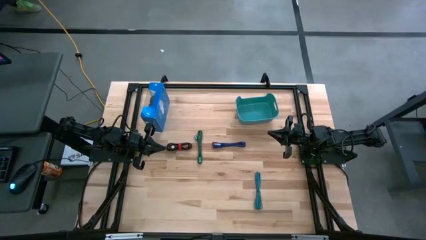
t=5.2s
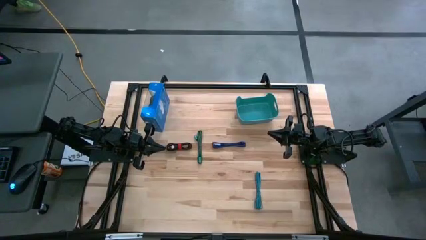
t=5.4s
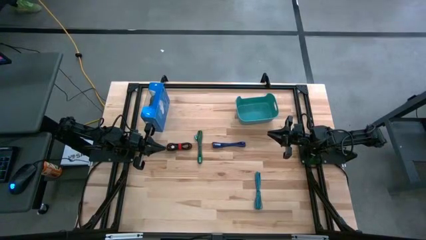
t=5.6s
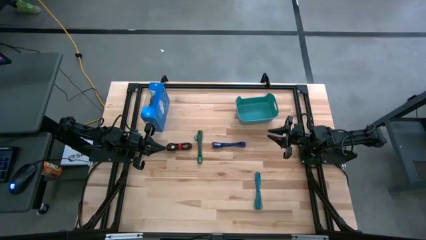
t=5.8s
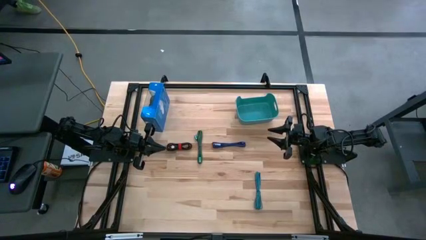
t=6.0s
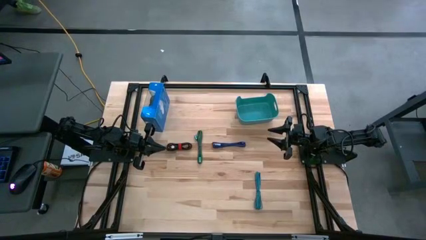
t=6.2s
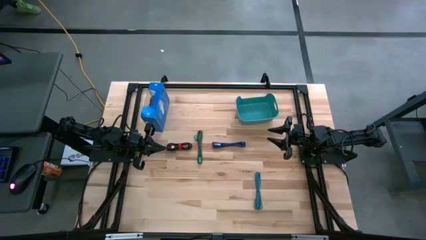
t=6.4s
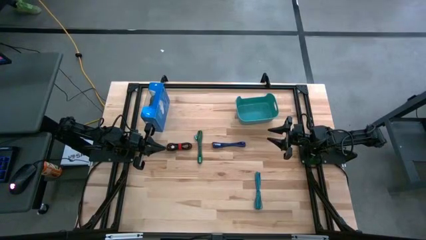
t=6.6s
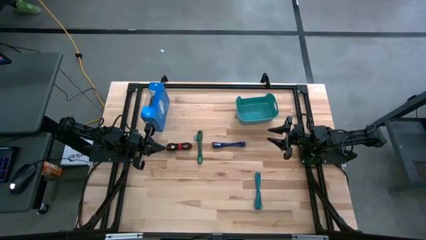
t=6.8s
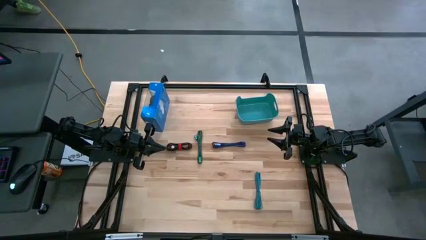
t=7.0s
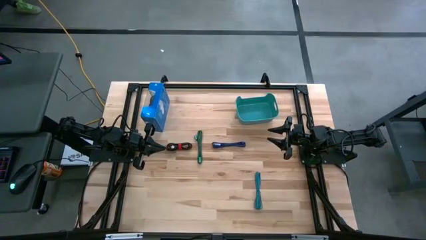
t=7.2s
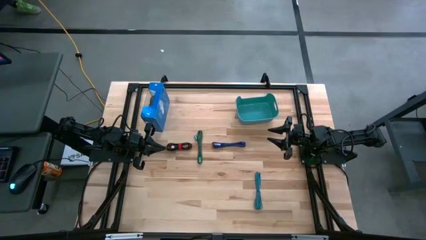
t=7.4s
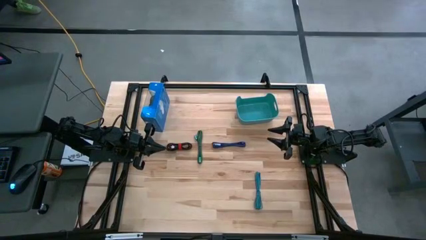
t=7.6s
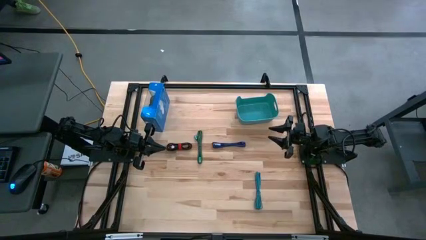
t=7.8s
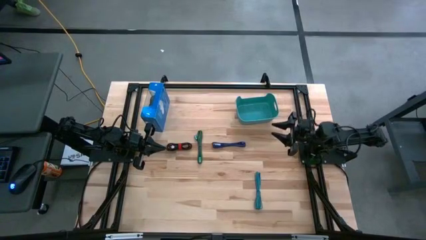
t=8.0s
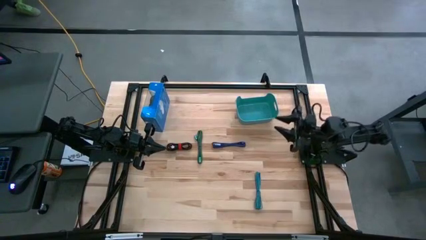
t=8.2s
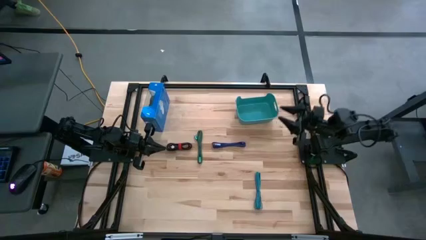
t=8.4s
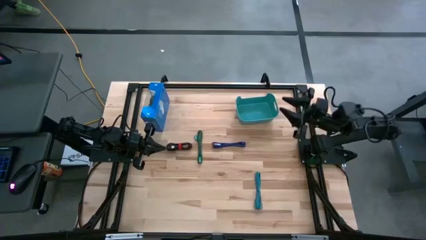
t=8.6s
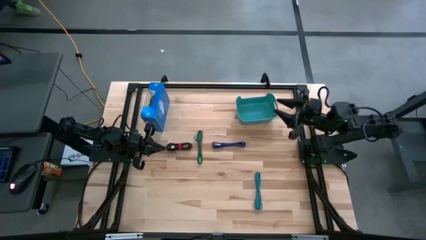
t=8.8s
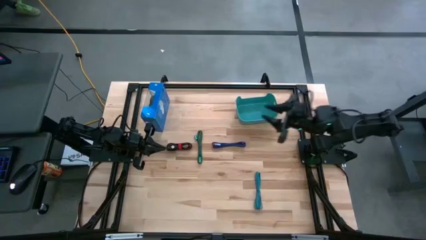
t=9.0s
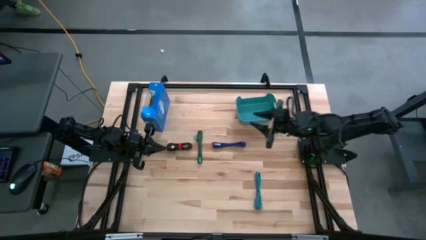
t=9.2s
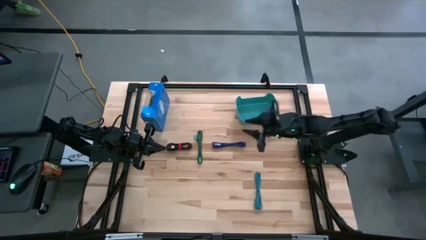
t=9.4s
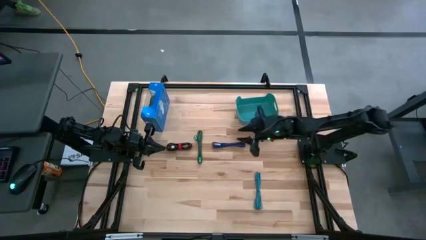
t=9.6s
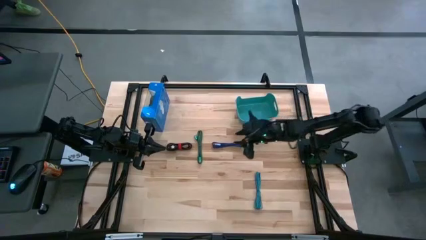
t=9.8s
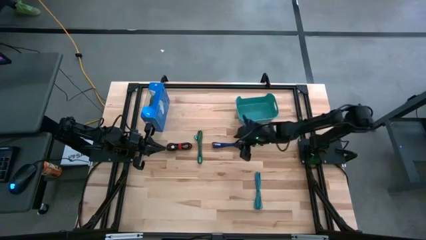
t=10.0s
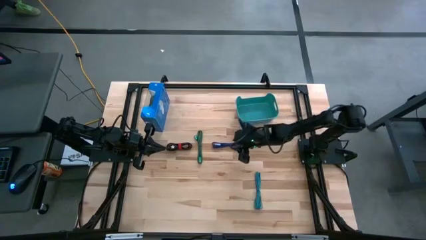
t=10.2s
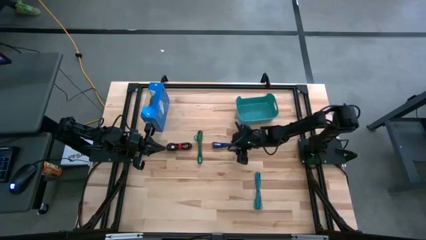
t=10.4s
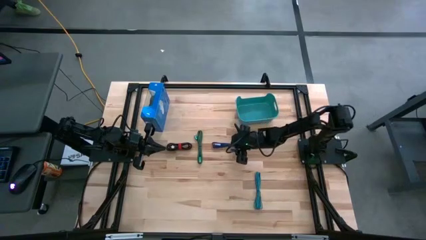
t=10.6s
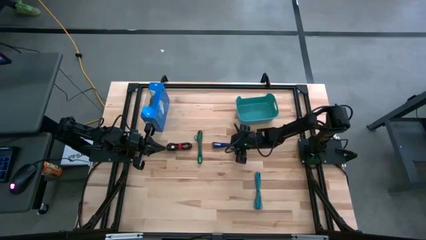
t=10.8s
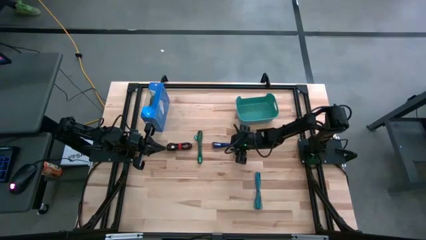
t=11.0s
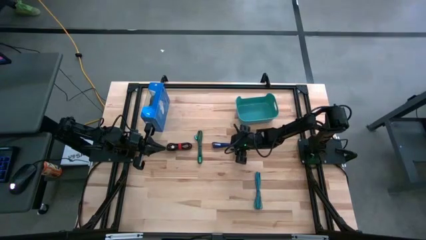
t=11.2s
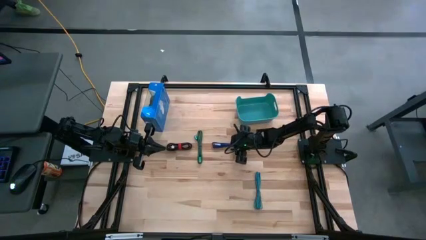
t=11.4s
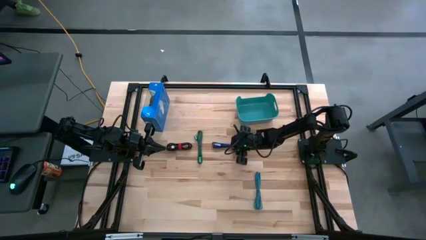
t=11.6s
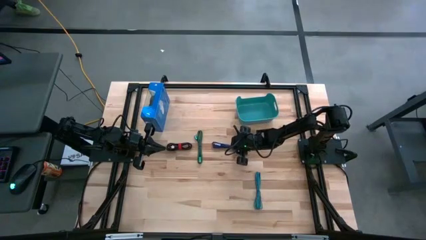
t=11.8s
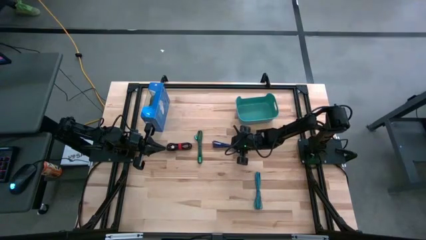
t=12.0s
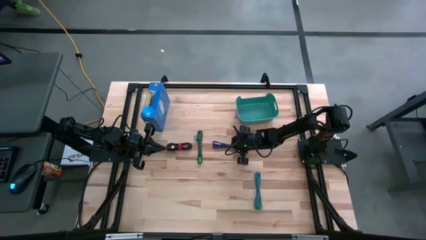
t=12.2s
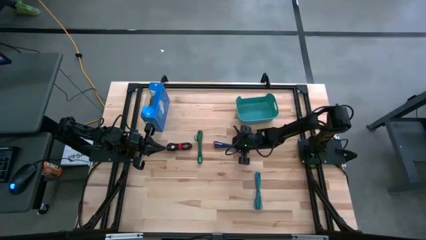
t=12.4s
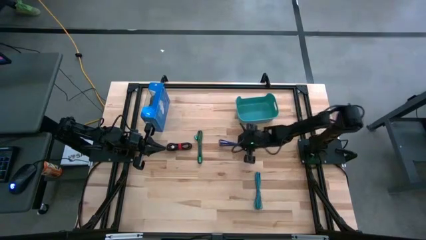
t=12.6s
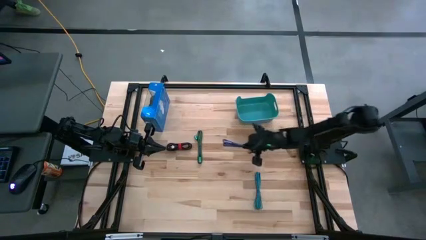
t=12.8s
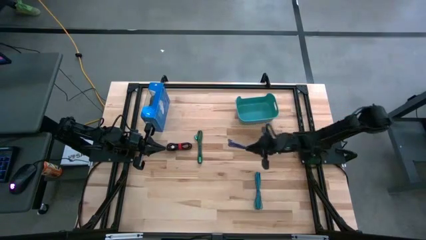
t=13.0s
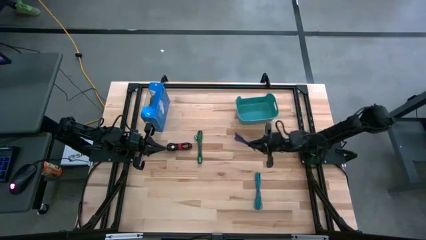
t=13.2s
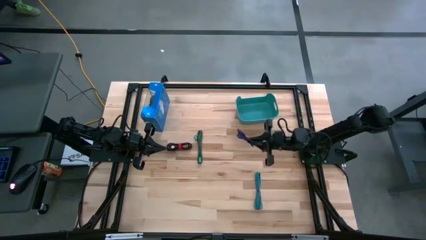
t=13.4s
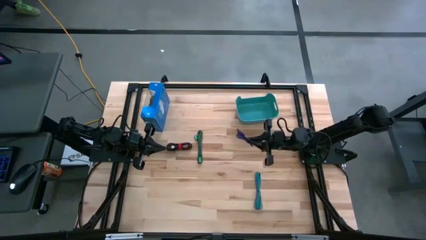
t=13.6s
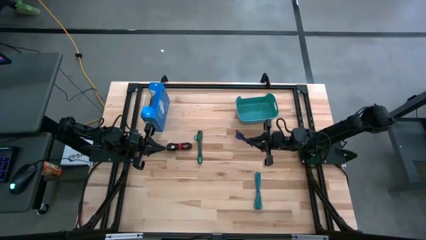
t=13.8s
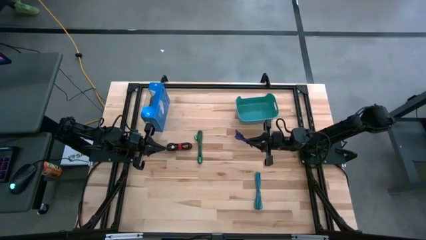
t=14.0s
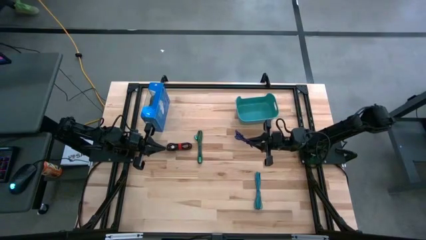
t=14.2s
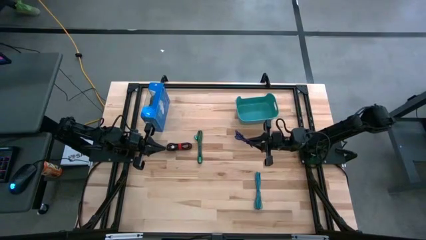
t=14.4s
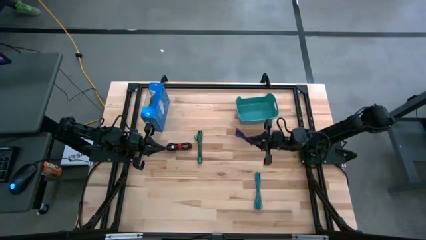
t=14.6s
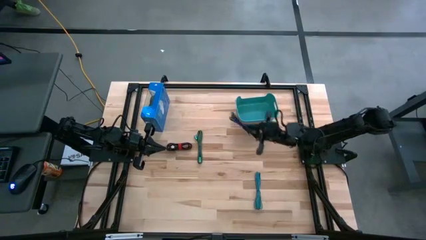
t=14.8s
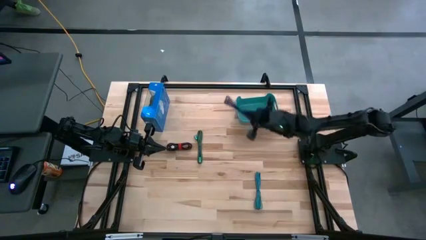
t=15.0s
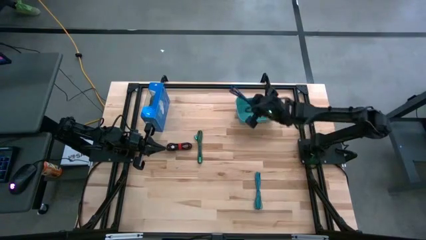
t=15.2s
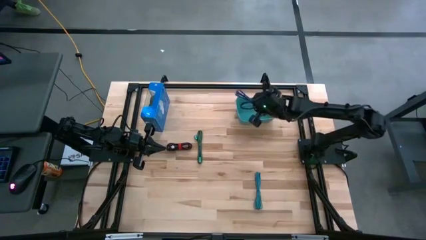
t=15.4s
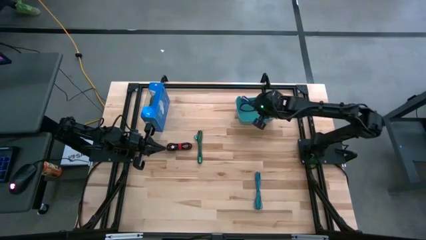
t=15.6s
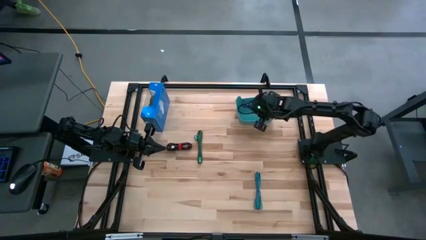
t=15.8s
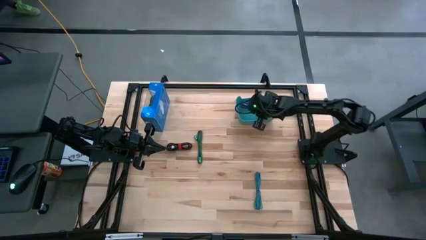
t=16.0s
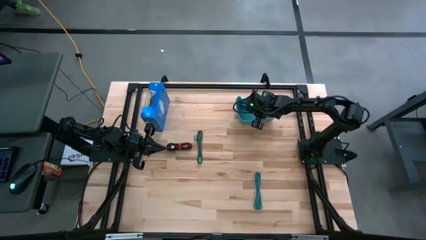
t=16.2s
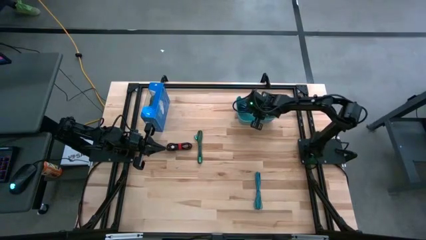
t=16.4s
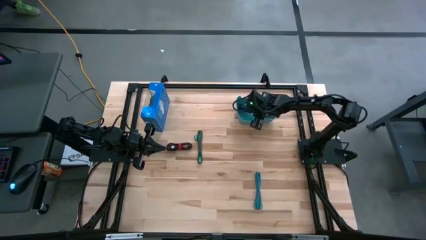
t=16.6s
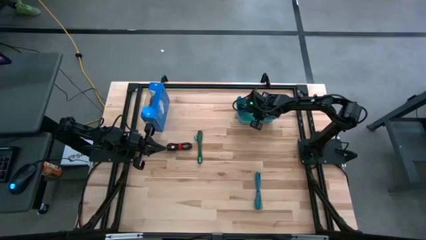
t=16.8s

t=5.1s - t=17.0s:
Task: Pick and place USB-C Cables
Put the purple charger cable into the green bin

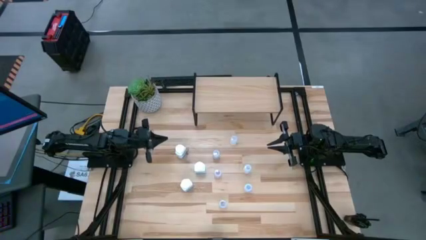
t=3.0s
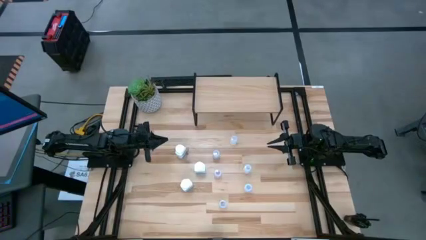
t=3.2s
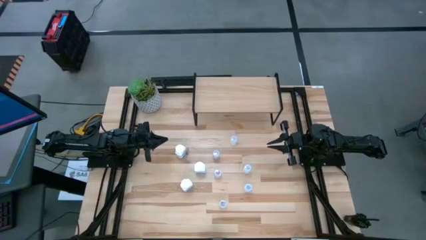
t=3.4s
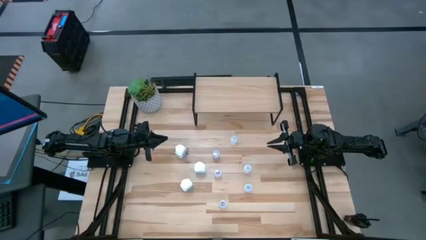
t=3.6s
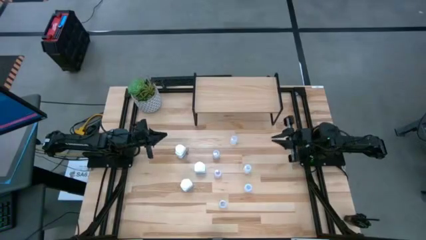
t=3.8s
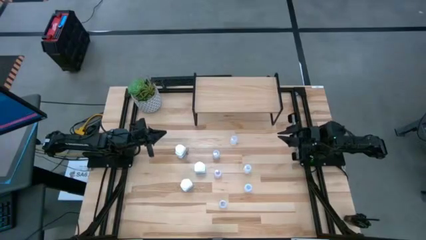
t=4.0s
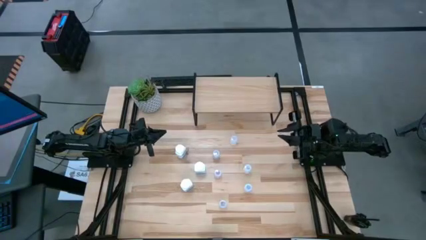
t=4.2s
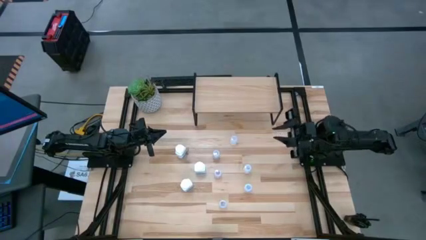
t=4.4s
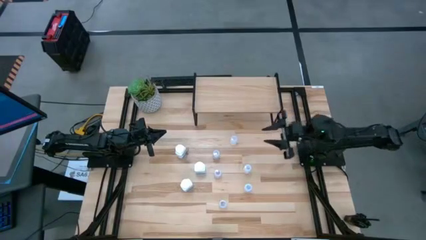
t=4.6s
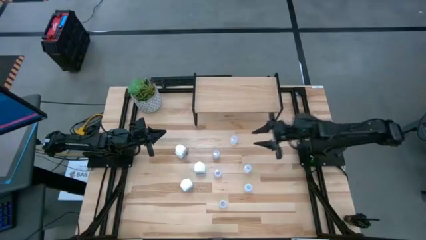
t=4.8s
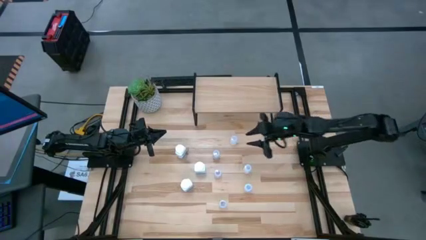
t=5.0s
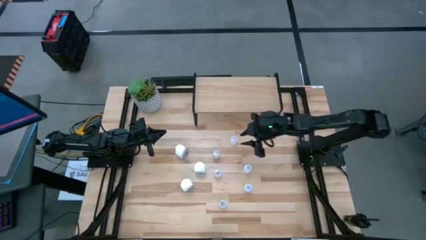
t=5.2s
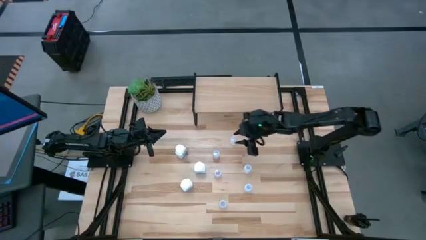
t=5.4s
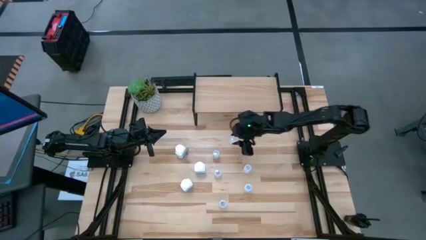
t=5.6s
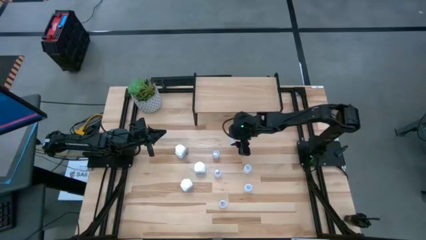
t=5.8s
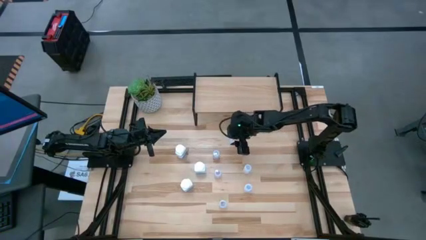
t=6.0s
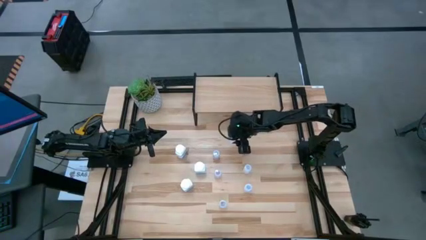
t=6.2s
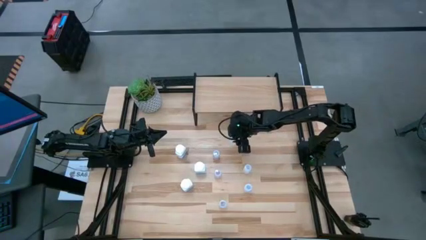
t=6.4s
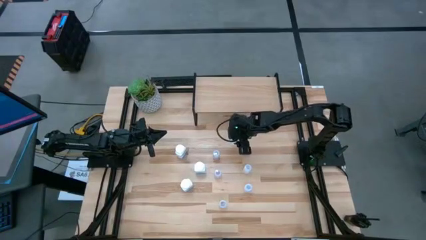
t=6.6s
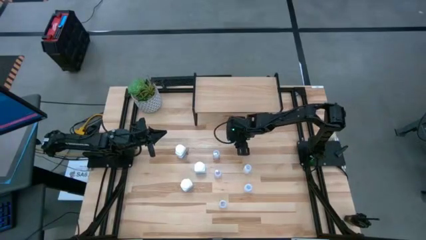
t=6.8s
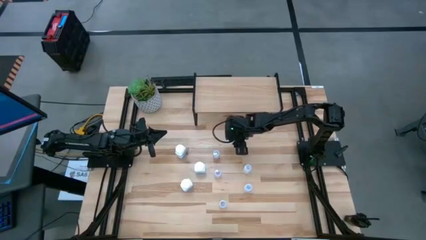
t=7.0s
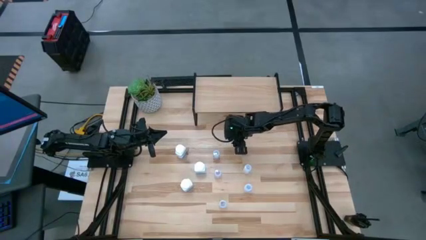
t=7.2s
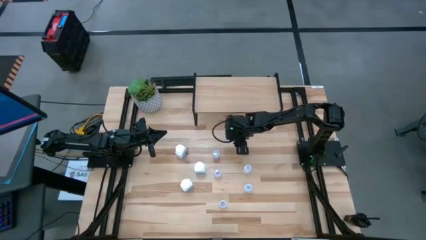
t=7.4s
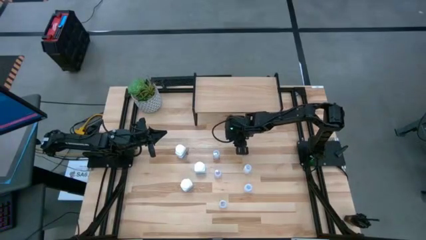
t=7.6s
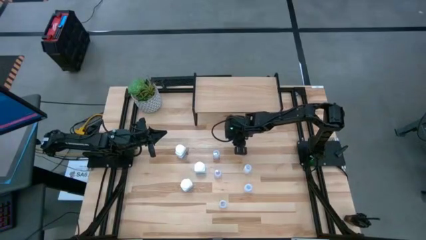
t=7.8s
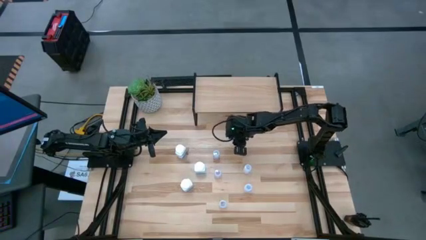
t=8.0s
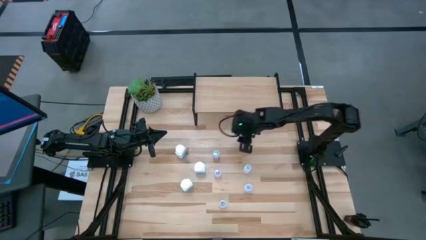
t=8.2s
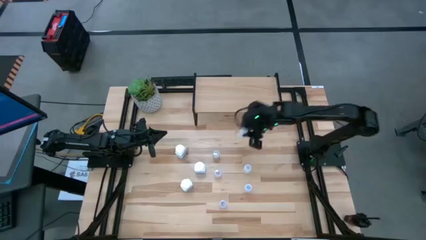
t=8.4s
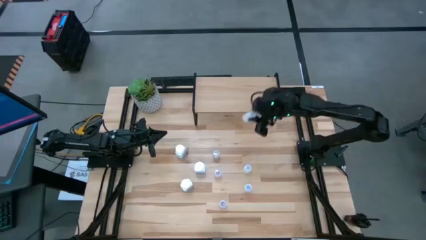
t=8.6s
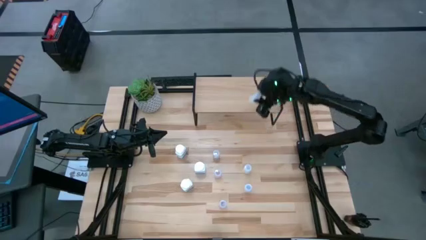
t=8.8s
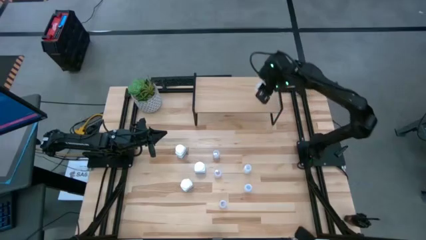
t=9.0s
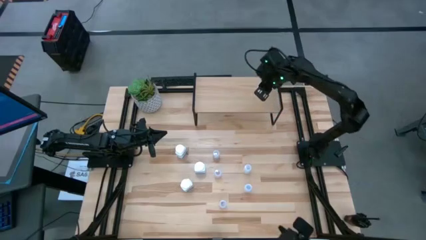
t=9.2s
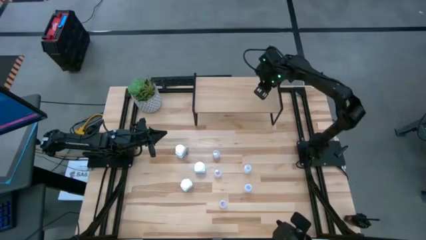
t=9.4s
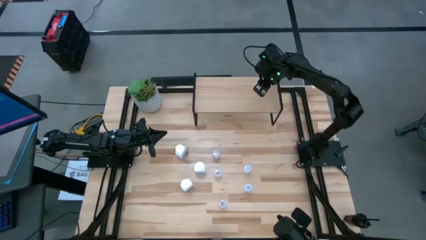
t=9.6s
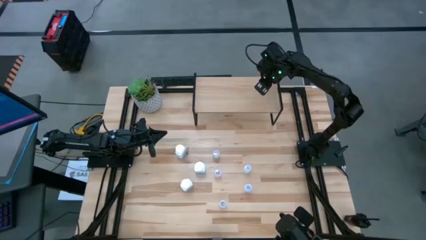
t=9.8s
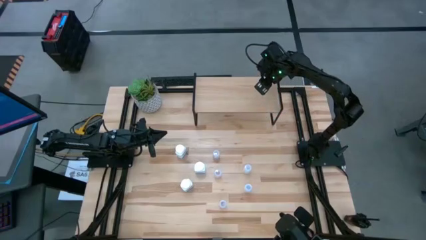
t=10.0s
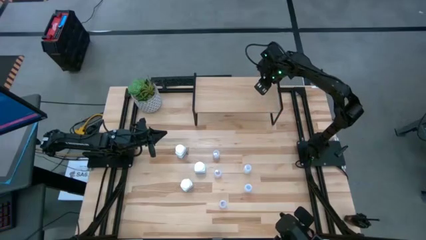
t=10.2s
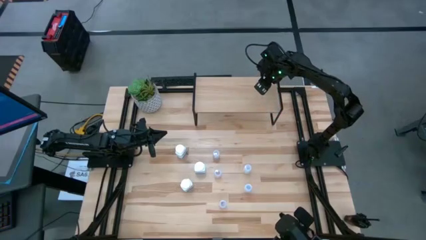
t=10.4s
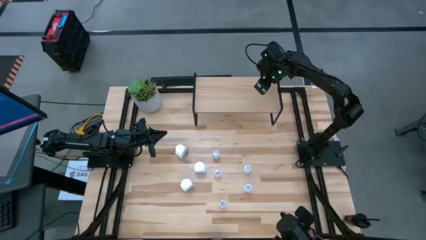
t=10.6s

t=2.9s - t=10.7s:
Task: Pick and place medicine bottles onto shelf by color
Put the top small white pill bottle on the shelf
